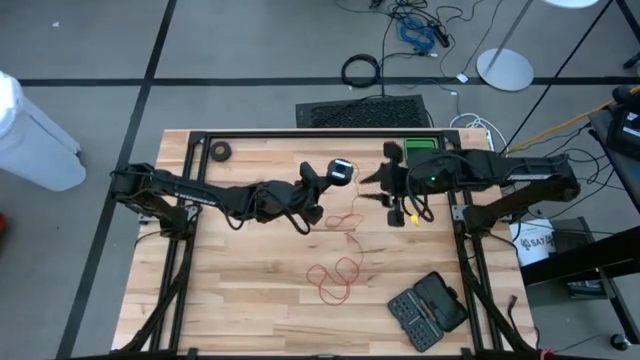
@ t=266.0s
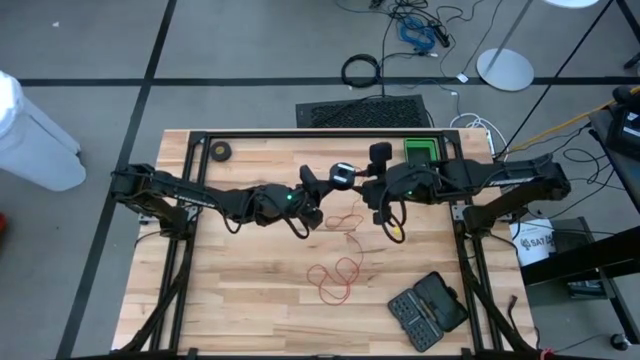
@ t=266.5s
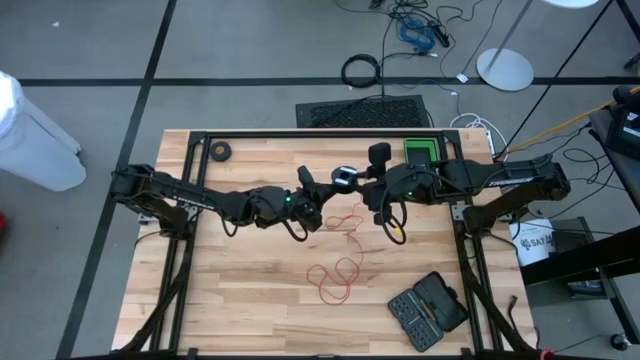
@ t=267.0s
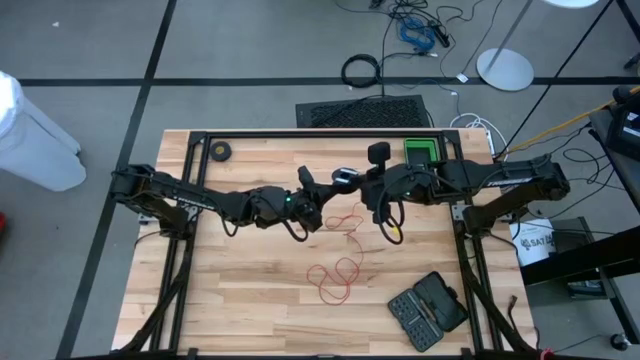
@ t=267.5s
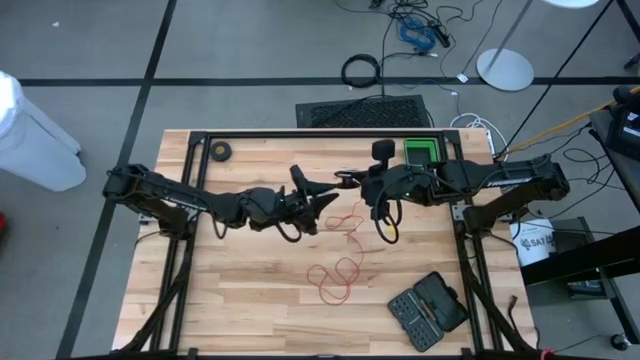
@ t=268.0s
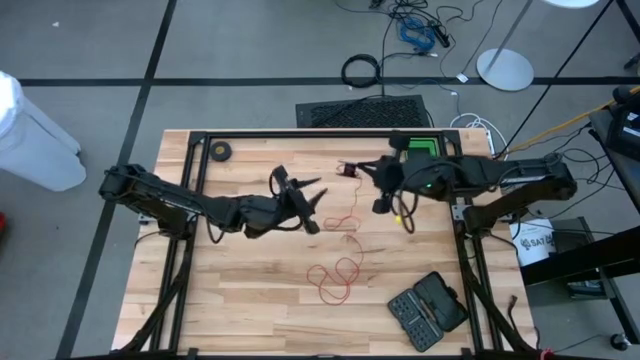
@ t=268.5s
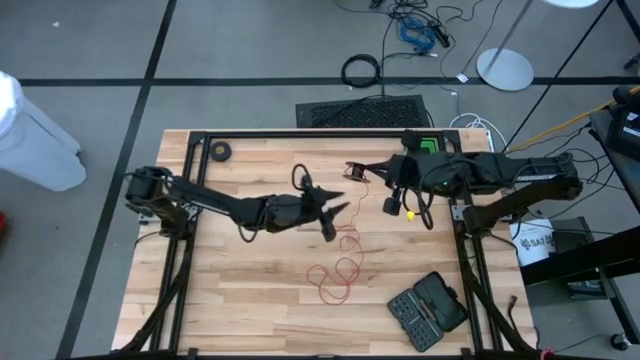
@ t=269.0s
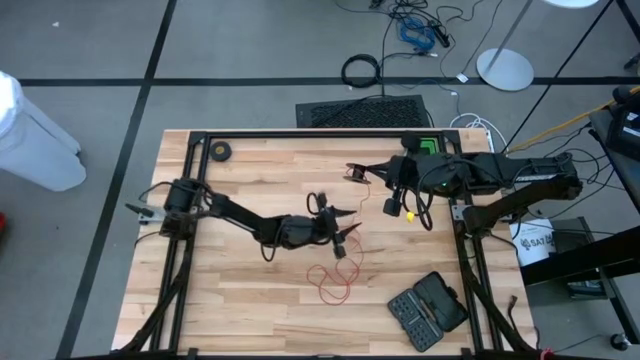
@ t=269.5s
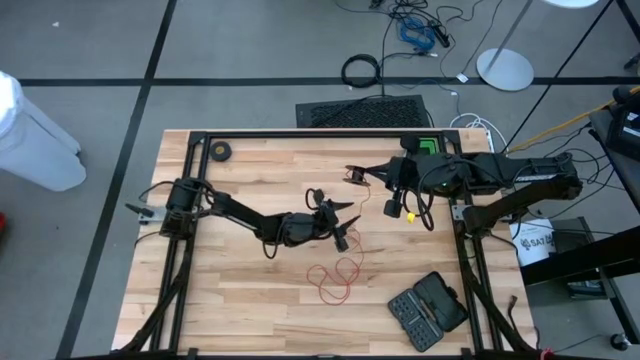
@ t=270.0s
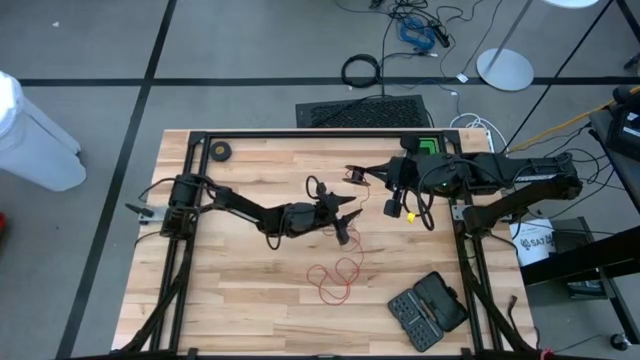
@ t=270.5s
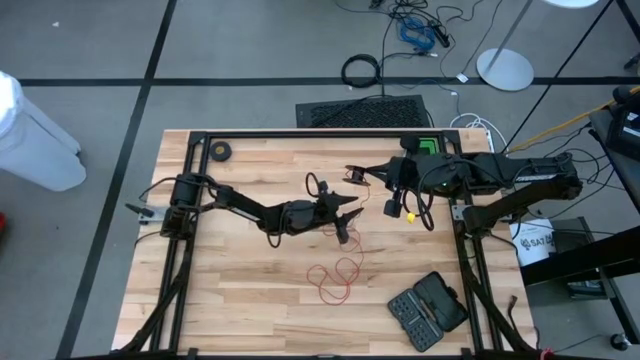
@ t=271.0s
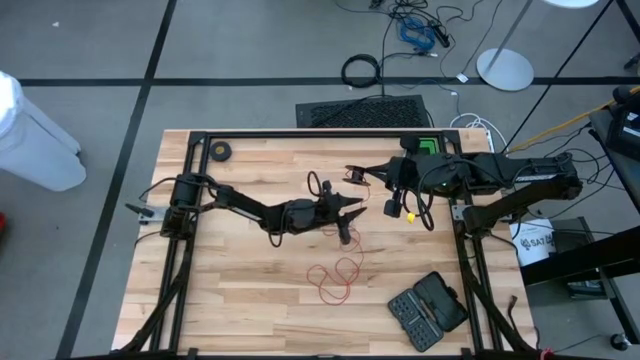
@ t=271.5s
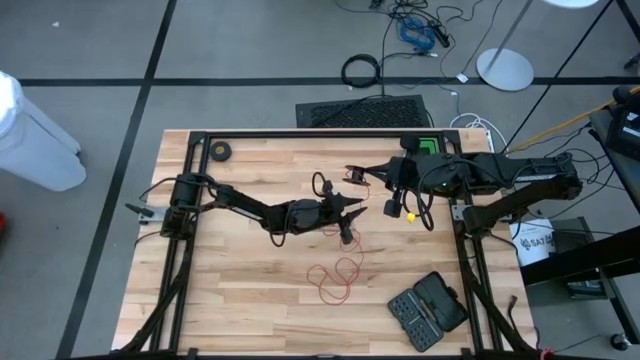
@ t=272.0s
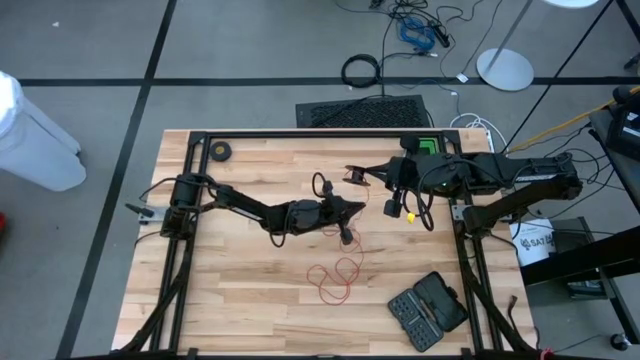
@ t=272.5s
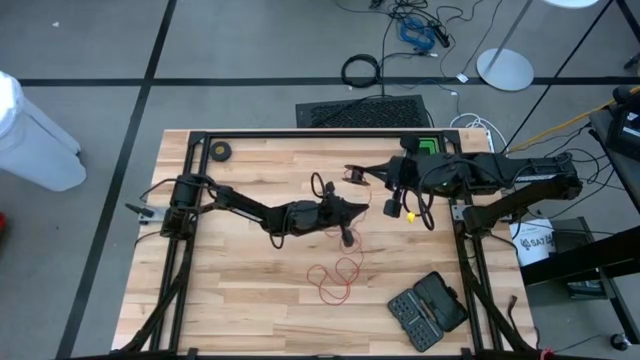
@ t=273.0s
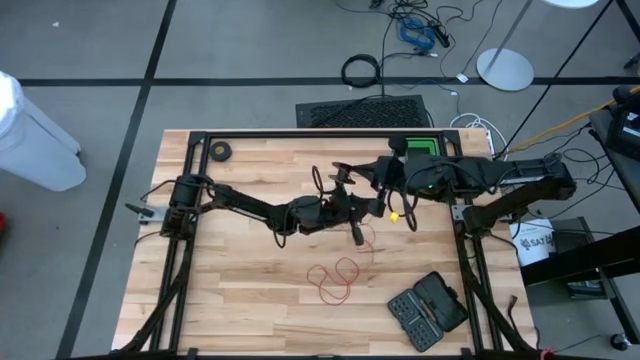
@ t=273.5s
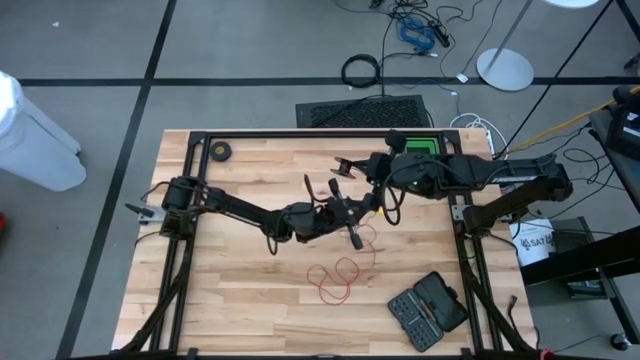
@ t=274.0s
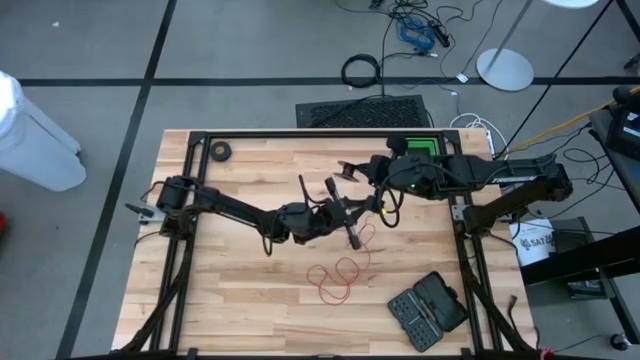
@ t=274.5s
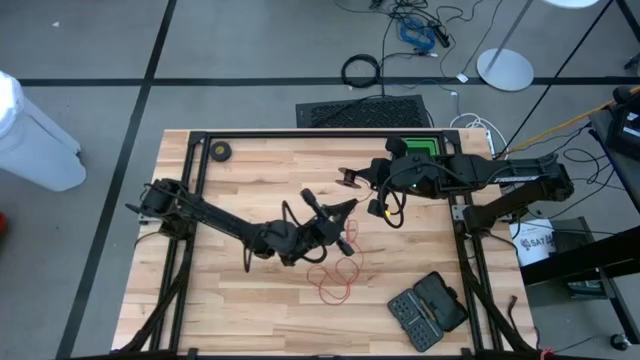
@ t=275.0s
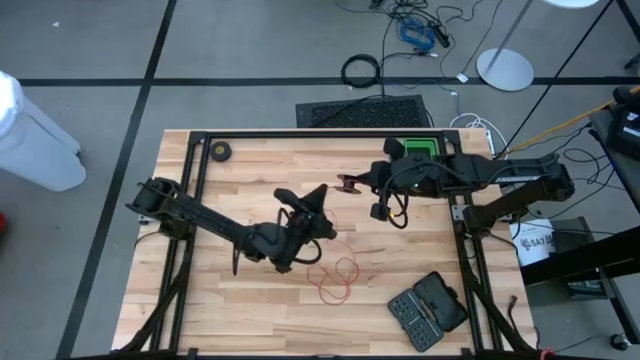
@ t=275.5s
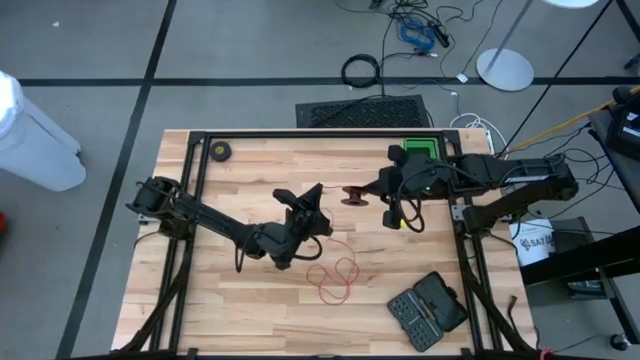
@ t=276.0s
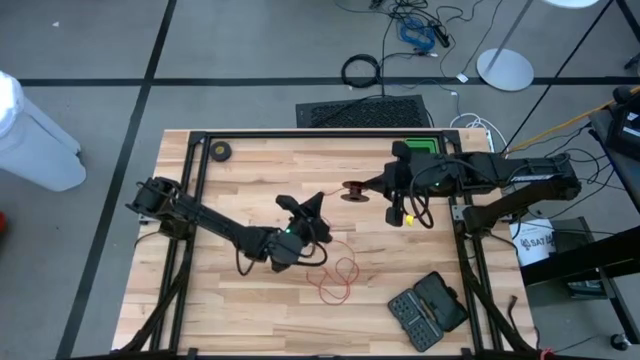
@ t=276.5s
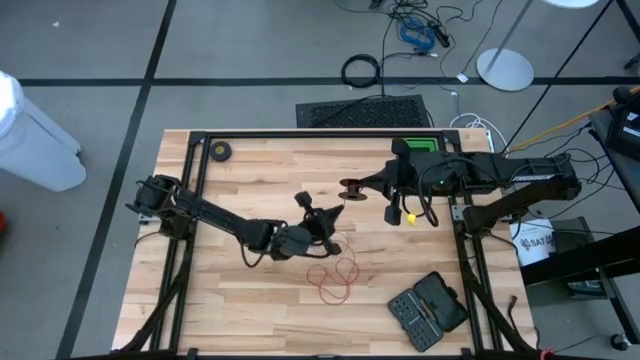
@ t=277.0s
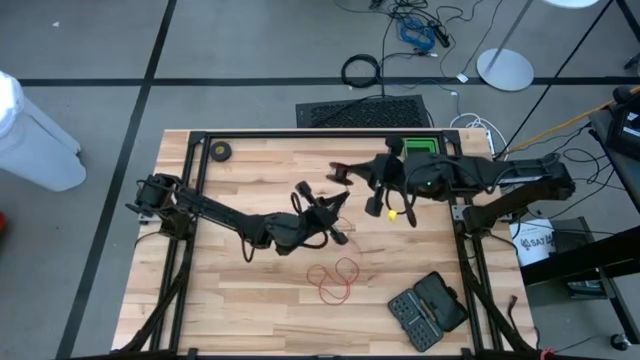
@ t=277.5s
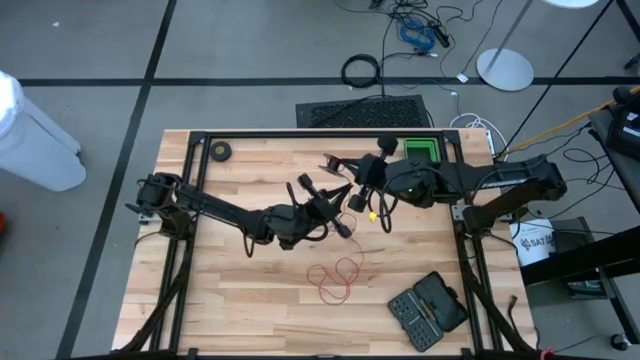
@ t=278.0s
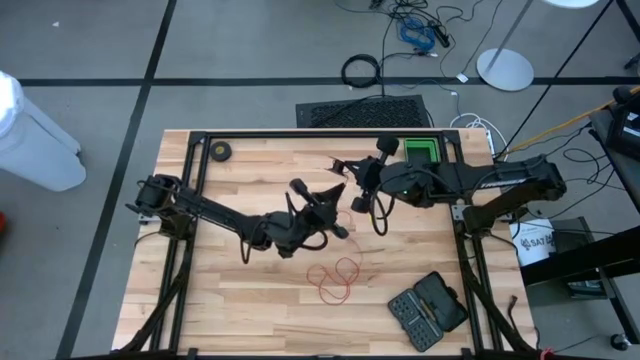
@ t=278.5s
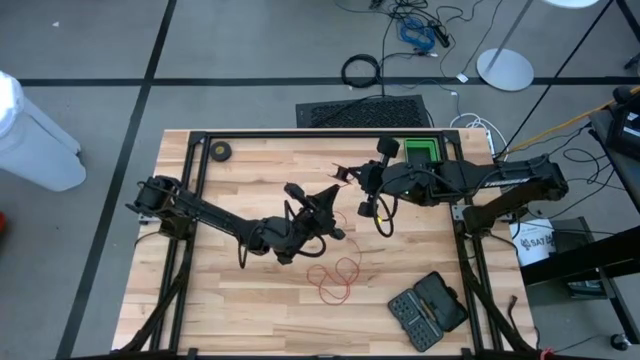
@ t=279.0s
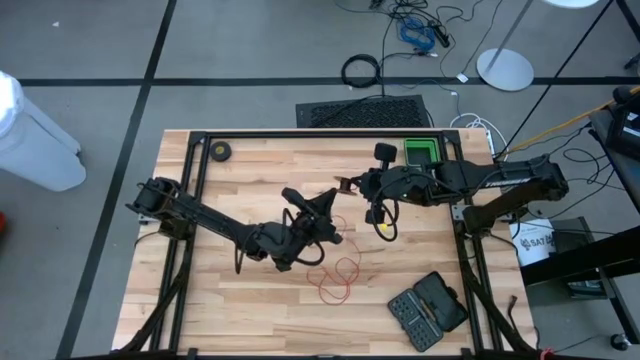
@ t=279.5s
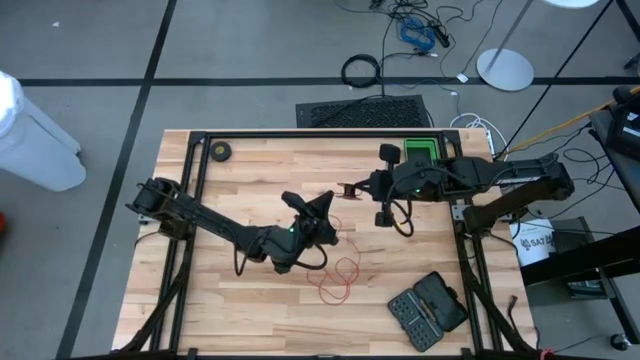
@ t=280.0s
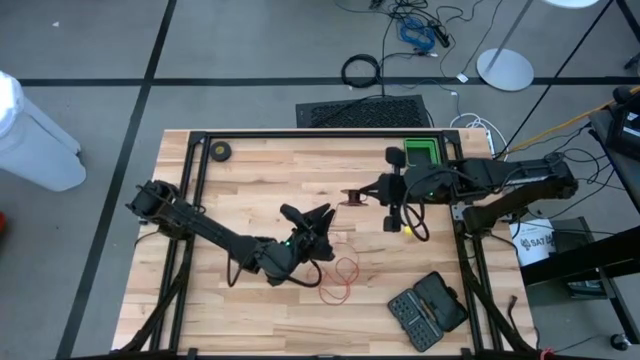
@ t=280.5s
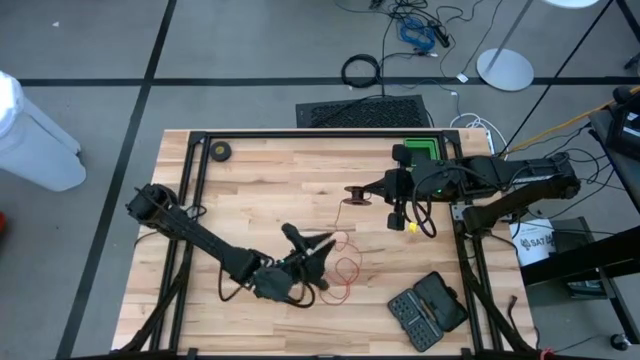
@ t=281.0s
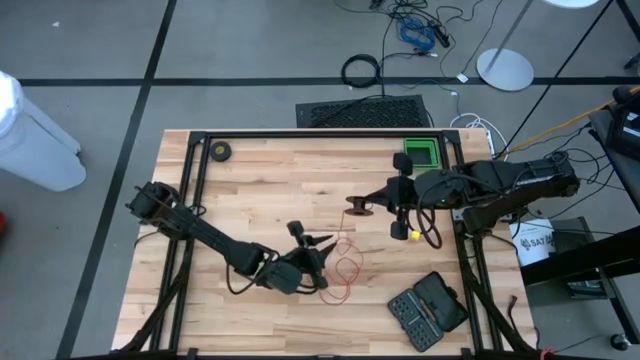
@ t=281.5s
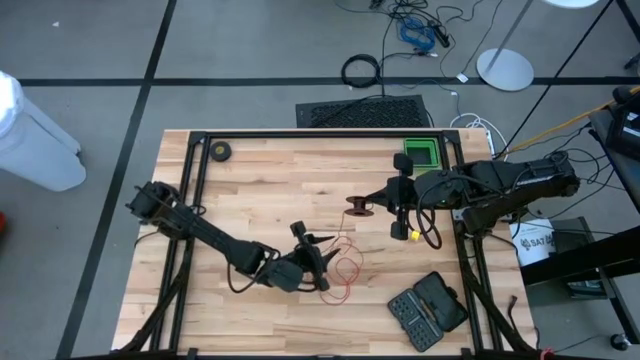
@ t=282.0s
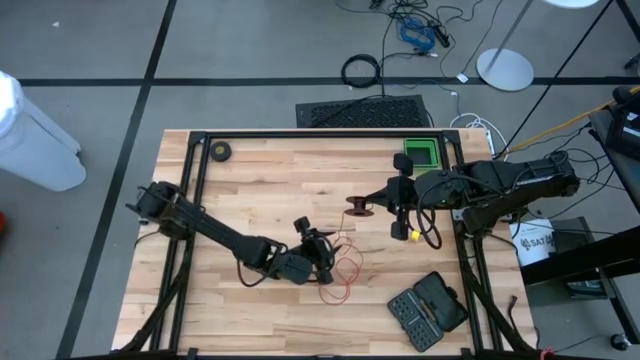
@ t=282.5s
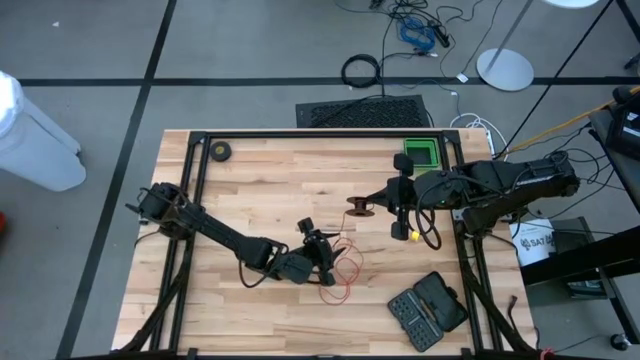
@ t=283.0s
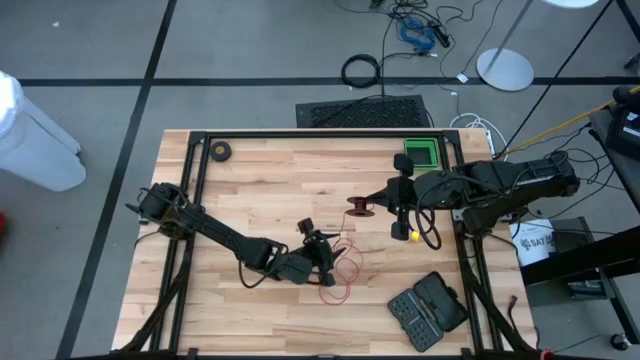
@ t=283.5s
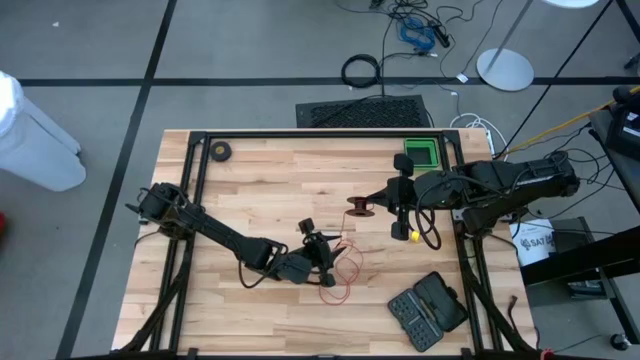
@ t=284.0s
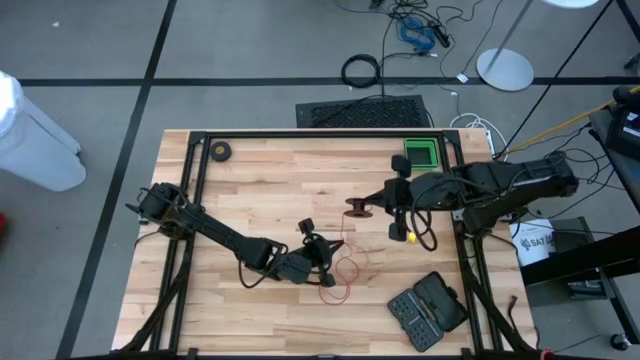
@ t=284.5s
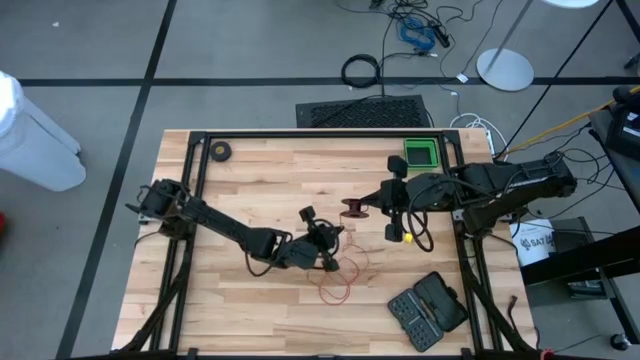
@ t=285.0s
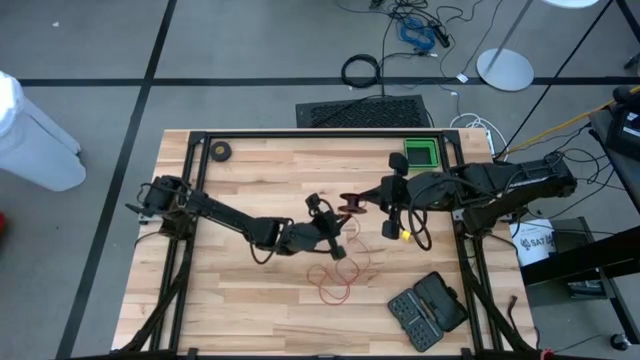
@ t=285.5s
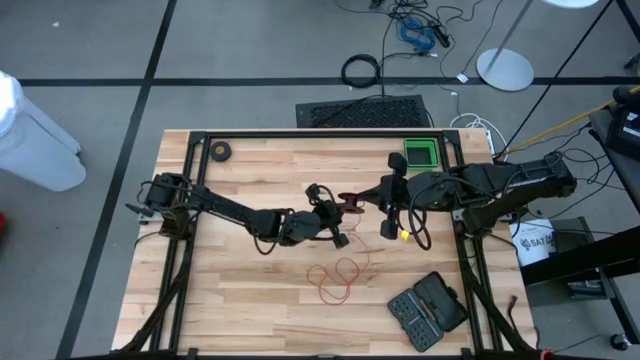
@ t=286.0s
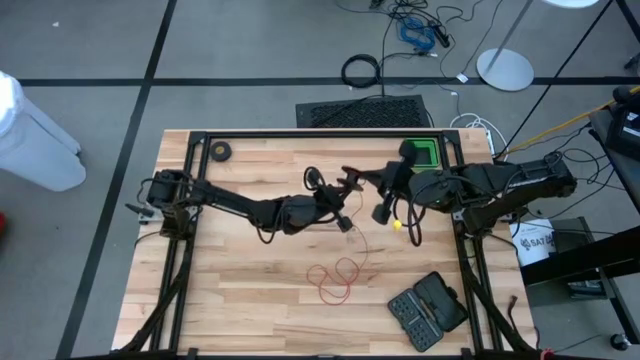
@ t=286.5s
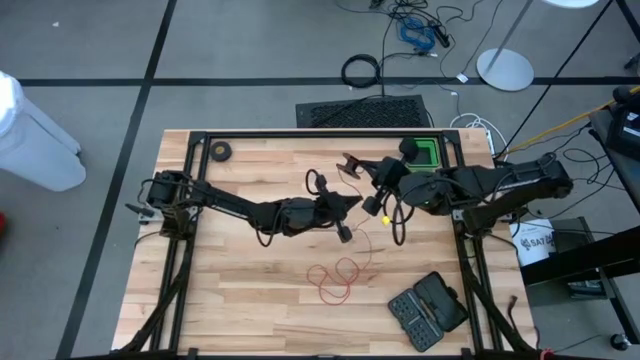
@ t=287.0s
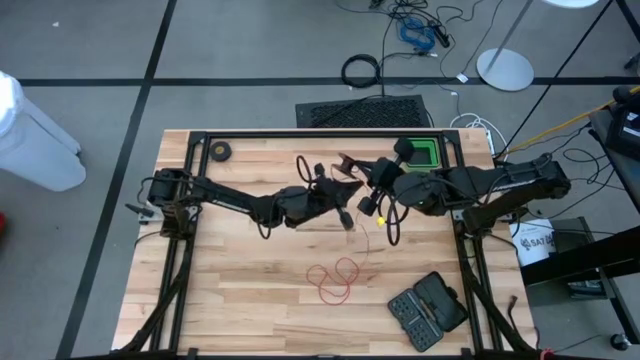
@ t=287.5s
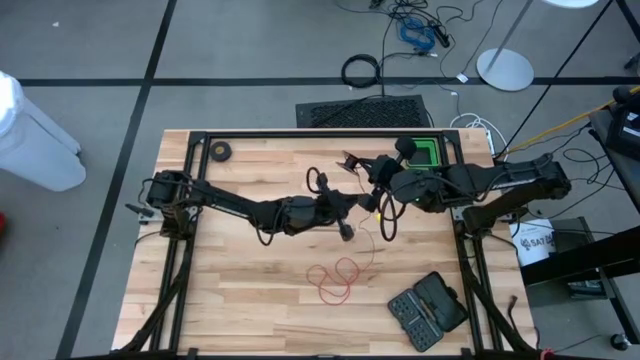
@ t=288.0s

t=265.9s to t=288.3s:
Task: Coil cords
Coil the red wire into the spool
